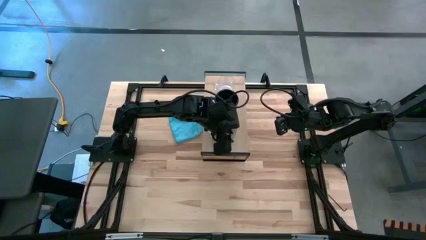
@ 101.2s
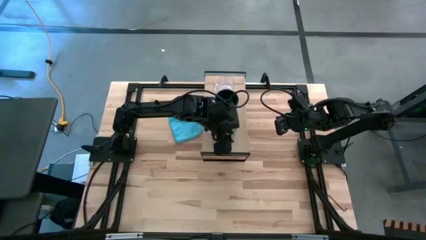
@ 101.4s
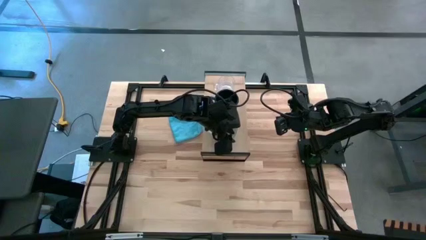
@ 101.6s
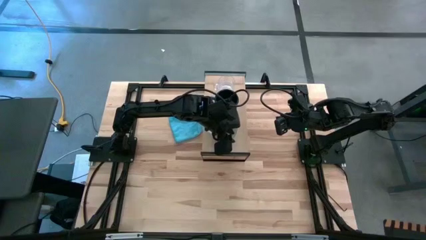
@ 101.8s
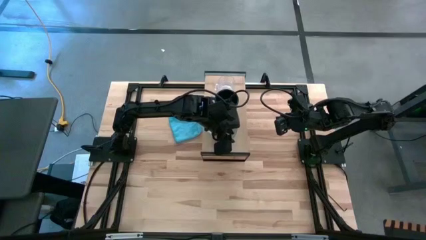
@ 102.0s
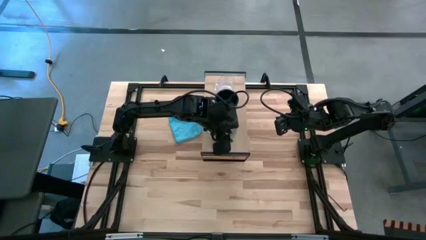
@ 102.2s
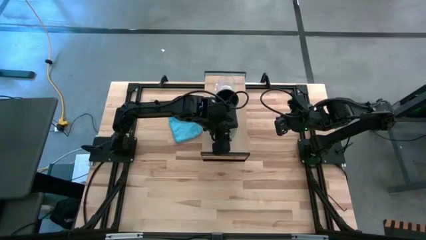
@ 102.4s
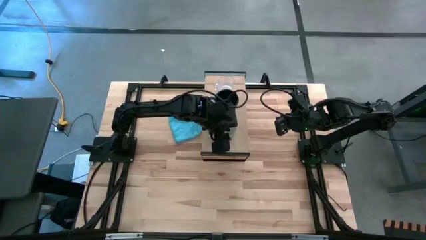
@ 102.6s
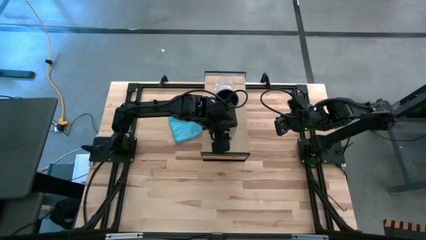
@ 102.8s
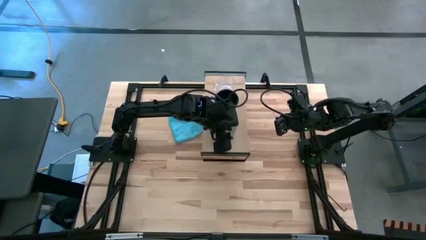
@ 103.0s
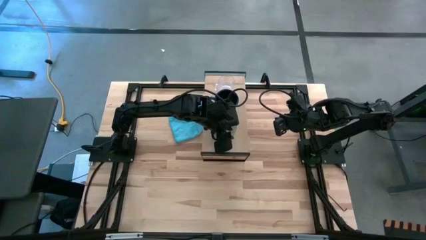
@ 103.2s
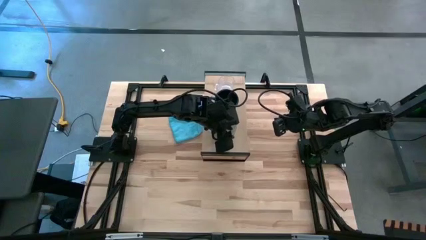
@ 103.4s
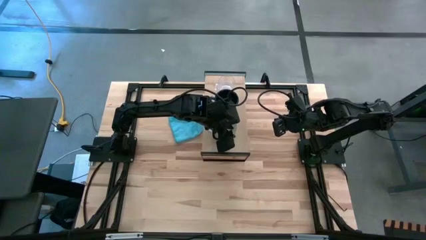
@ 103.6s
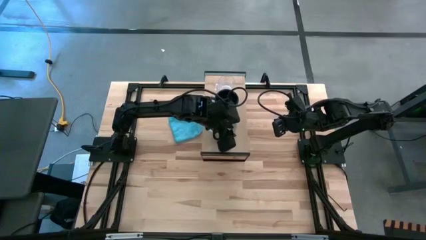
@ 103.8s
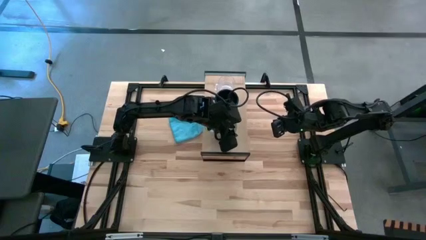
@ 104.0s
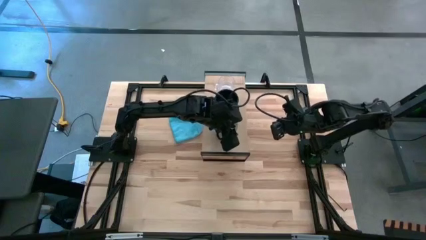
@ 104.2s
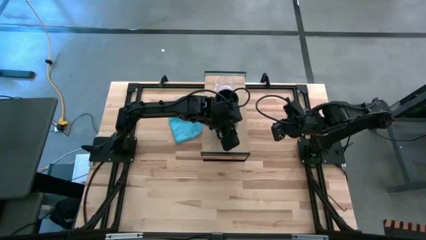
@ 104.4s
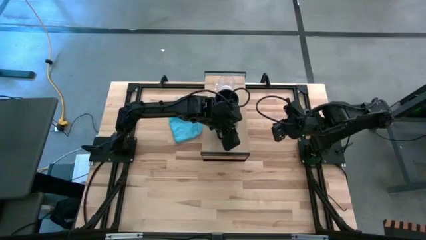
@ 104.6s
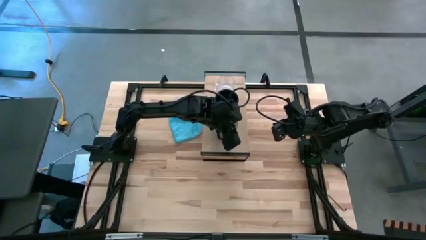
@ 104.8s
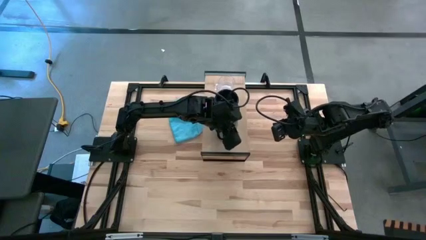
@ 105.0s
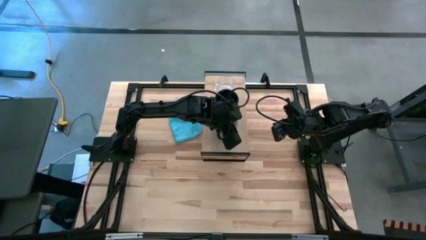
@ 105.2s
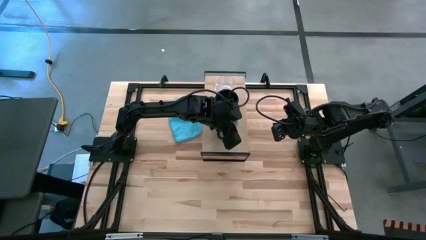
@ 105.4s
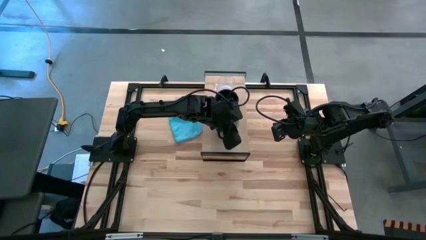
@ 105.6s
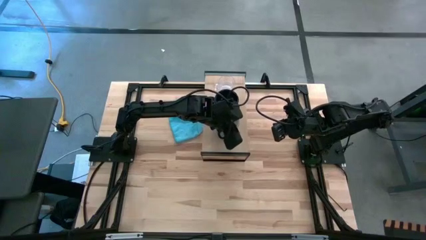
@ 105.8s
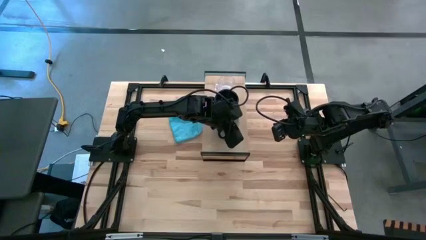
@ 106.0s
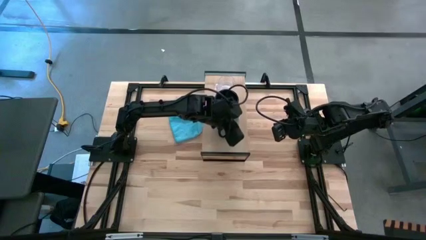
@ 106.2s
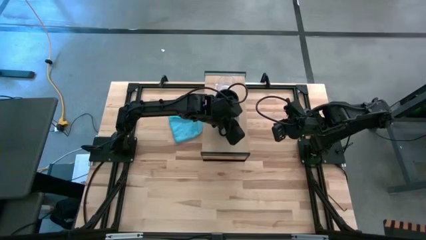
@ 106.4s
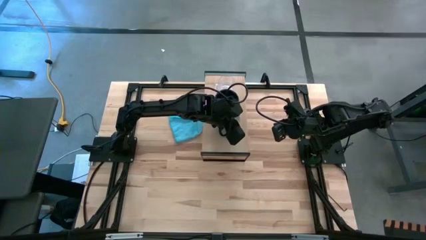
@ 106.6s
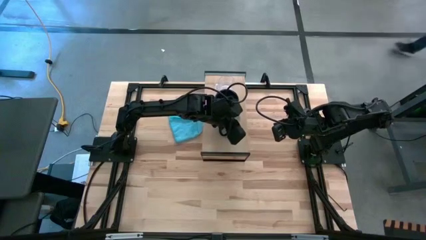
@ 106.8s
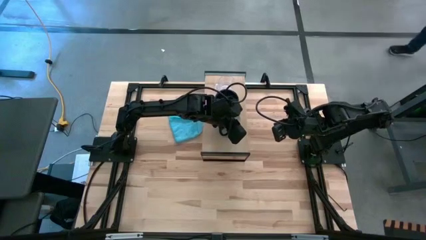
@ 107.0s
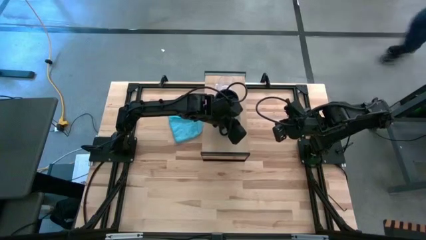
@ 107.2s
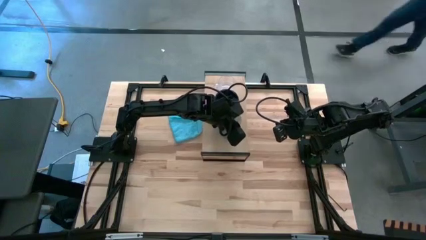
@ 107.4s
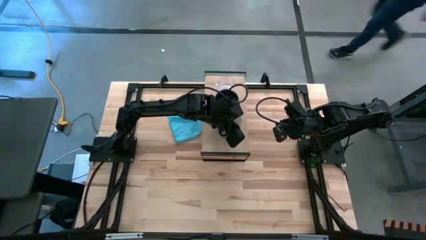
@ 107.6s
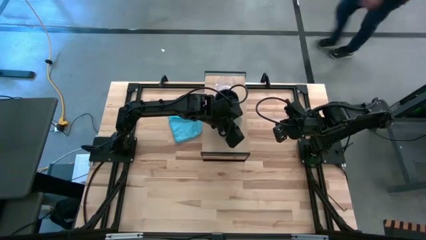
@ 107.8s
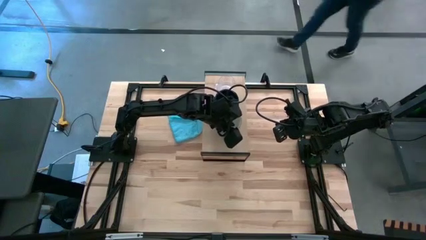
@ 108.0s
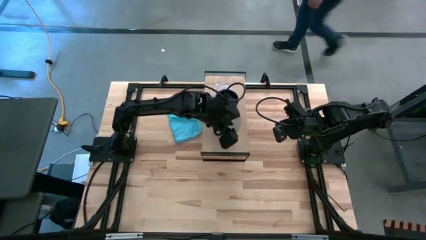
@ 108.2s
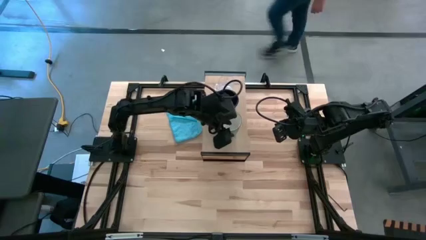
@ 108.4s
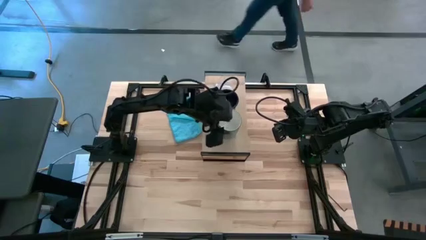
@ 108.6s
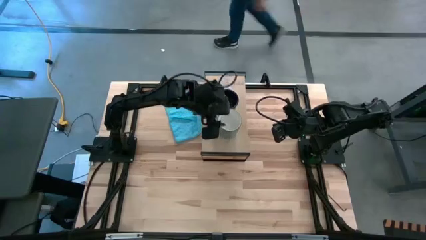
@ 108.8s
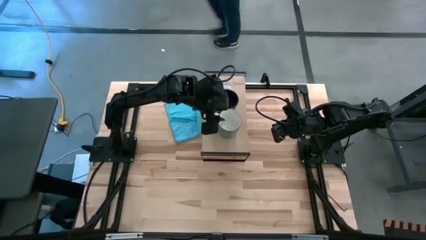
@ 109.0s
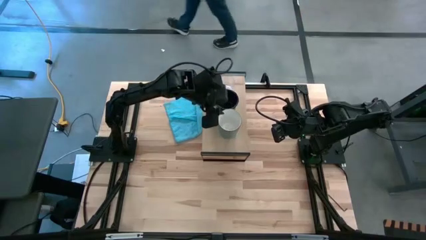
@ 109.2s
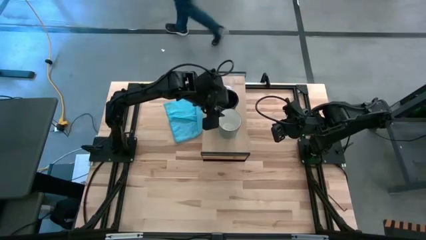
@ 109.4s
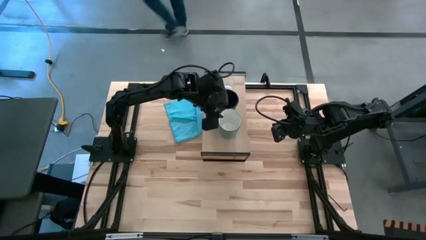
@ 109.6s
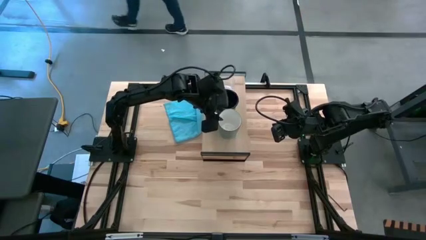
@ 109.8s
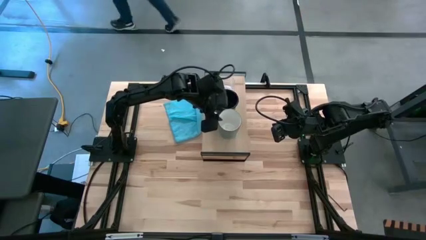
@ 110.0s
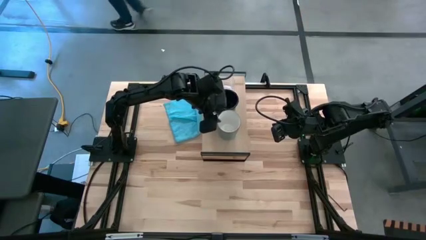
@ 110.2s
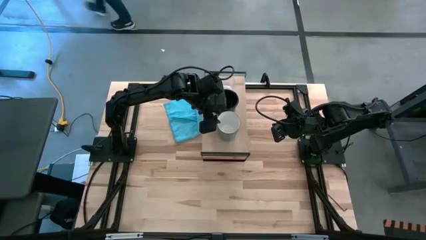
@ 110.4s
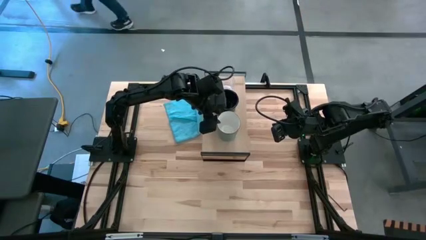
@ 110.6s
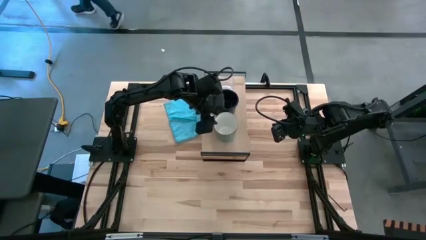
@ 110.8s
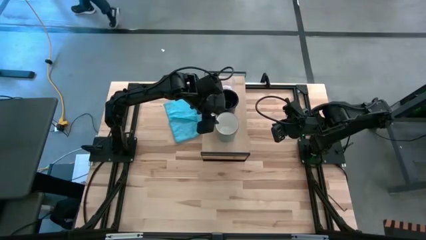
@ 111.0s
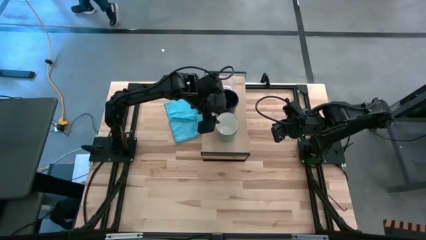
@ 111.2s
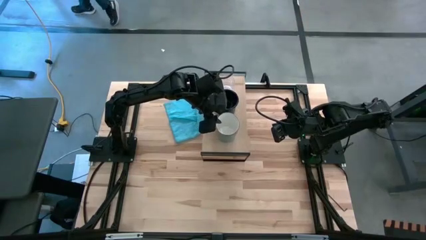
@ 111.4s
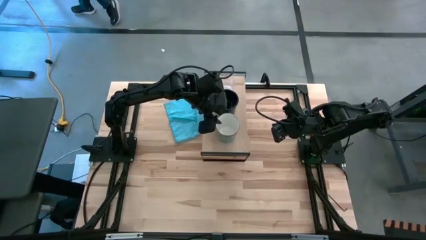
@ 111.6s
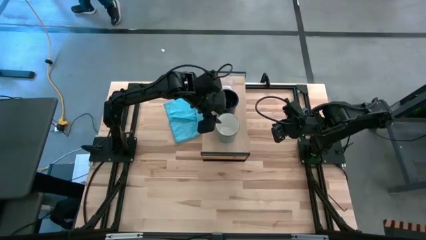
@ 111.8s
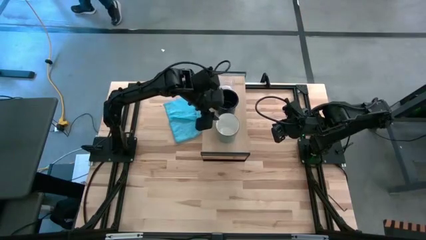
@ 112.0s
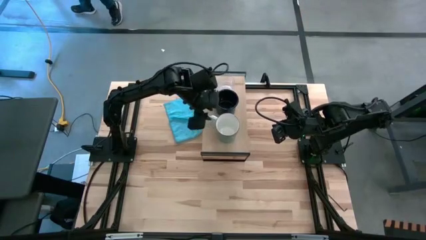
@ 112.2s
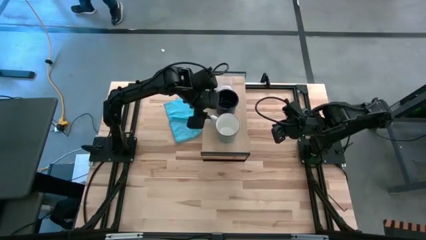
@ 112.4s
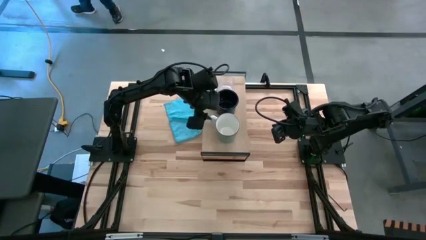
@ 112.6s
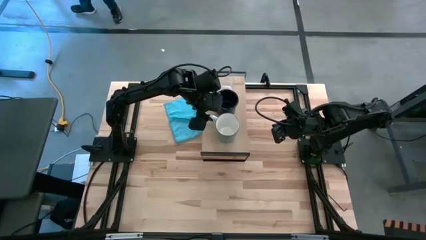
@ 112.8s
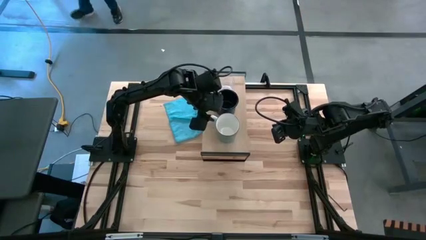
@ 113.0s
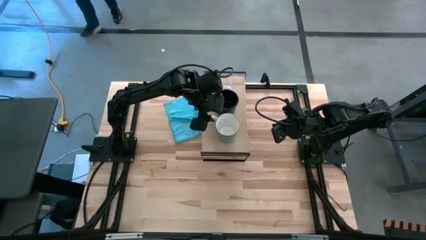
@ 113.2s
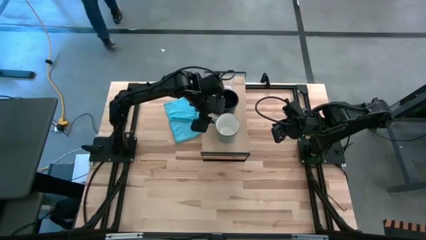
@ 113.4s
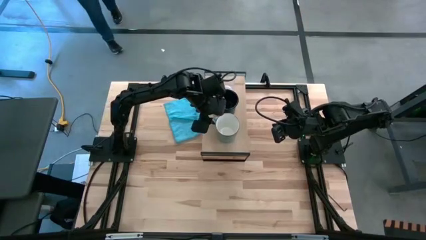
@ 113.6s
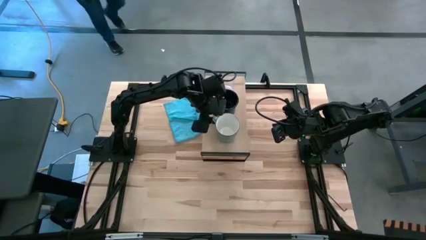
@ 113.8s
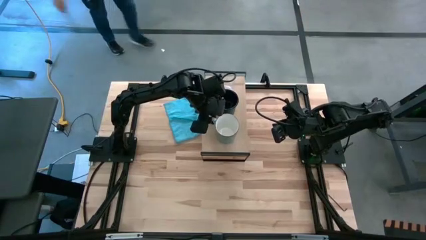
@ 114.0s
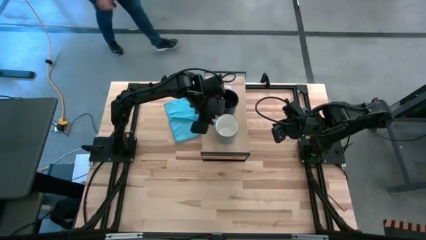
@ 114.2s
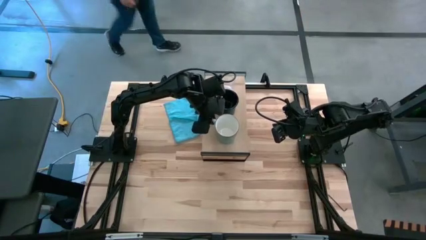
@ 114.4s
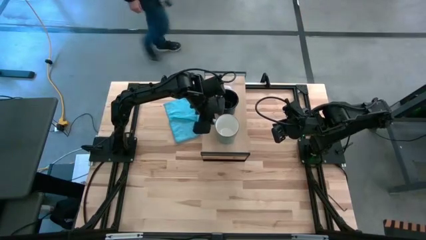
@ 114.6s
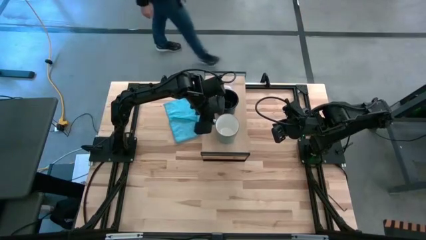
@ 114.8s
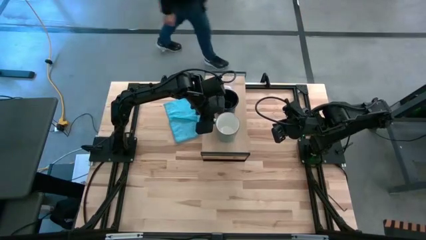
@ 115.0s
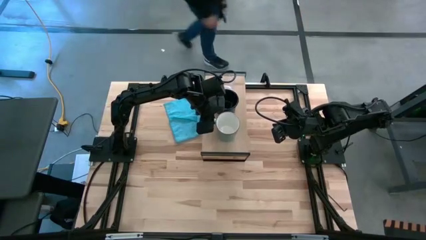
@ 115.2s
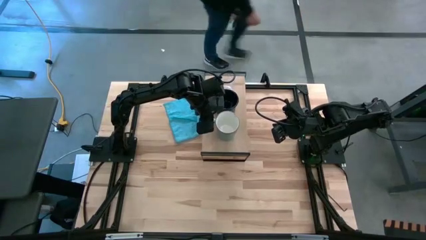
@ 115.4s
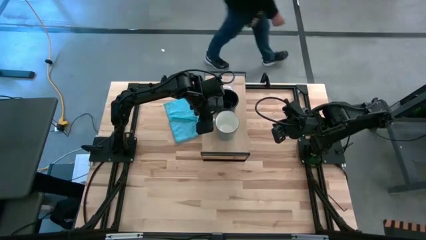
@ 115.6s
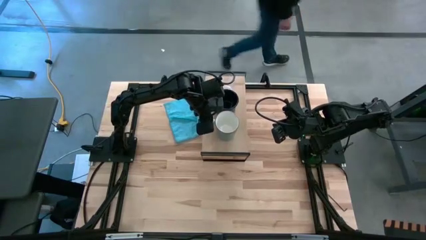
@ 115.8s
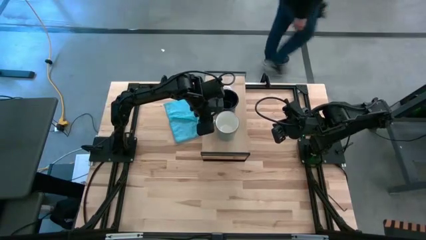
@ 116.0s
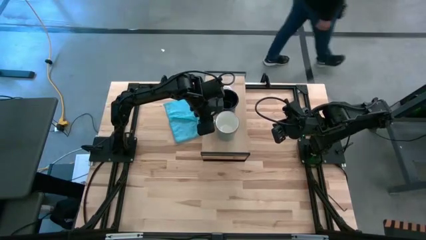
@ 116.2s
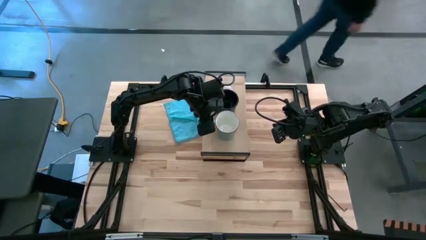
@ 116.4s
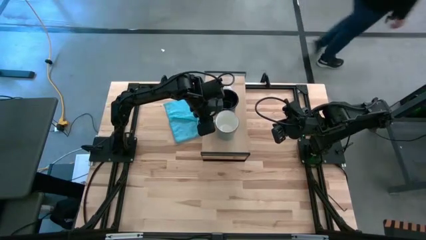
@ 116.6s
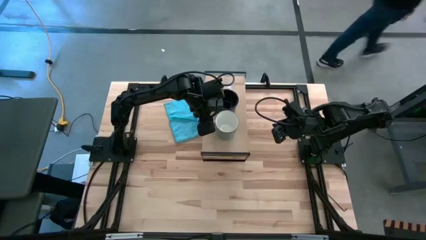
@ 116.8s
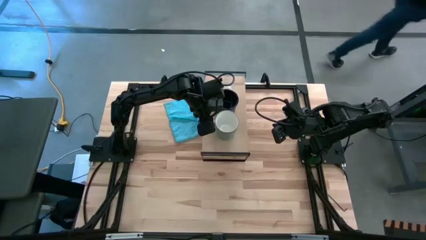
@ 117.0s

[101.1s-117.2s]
Task: Stack small to large cups/mugs on shelf
Put the light blue mug on the shelf
